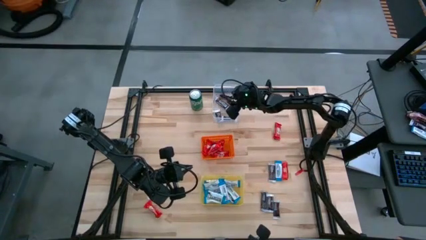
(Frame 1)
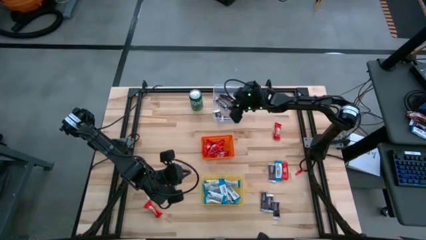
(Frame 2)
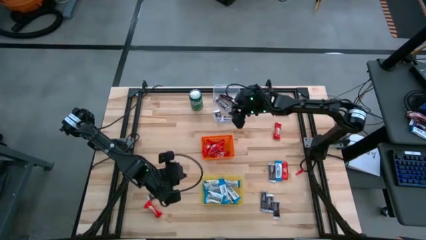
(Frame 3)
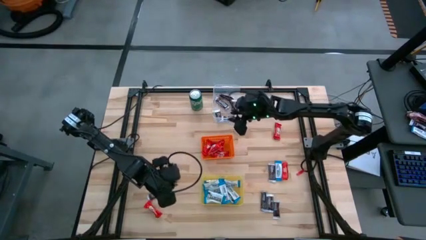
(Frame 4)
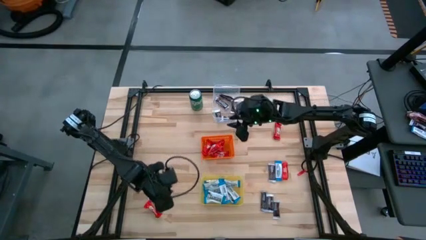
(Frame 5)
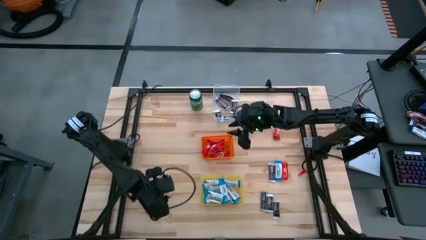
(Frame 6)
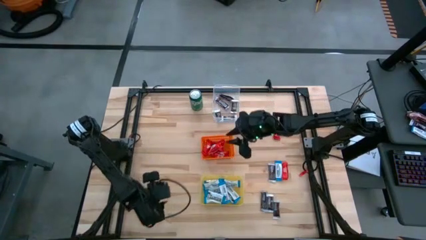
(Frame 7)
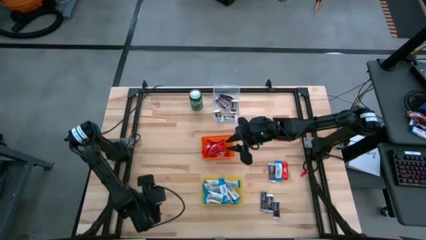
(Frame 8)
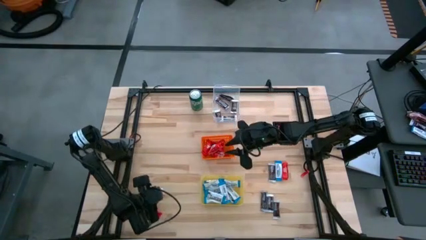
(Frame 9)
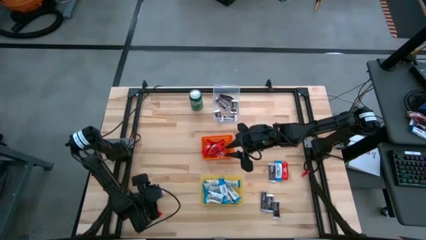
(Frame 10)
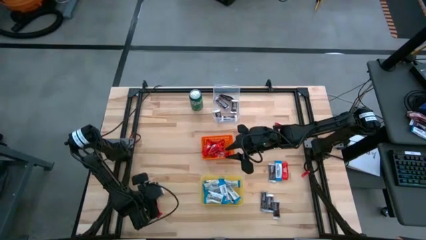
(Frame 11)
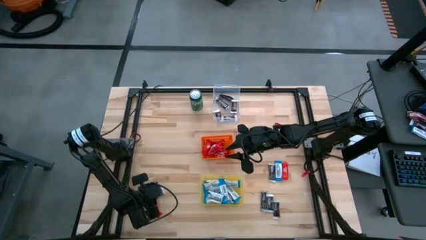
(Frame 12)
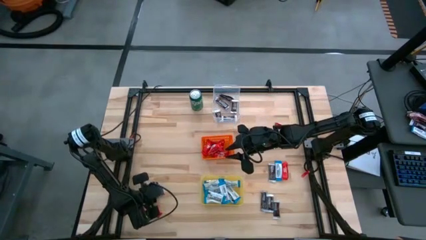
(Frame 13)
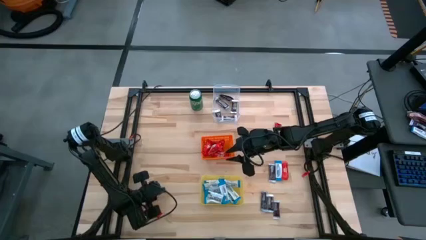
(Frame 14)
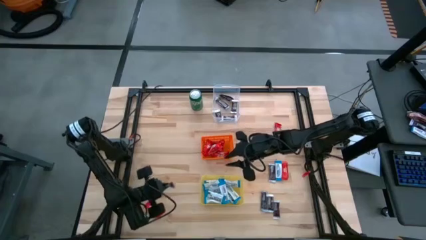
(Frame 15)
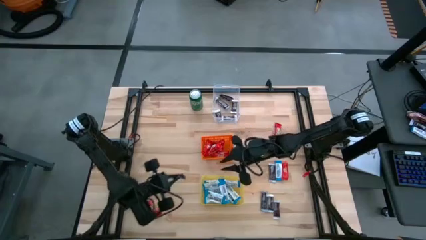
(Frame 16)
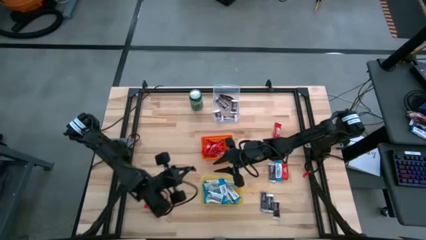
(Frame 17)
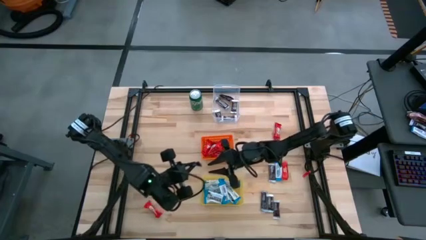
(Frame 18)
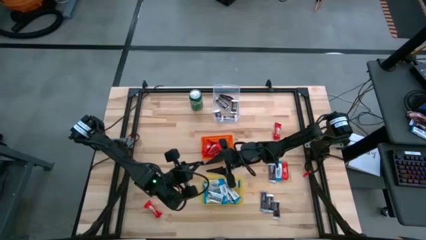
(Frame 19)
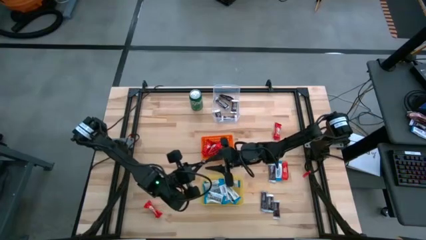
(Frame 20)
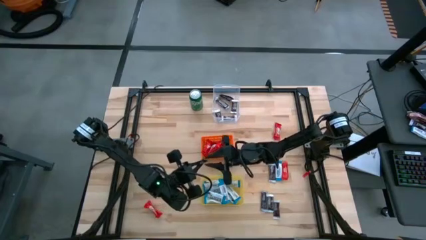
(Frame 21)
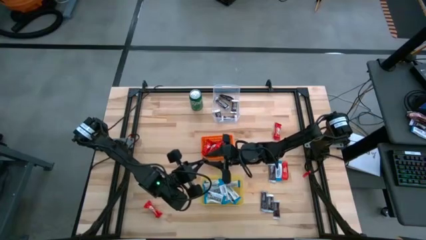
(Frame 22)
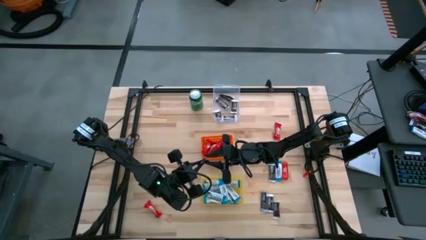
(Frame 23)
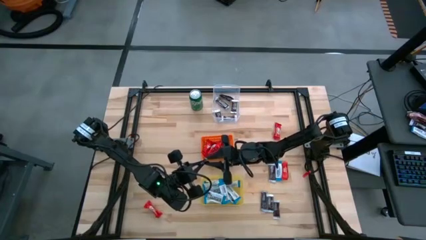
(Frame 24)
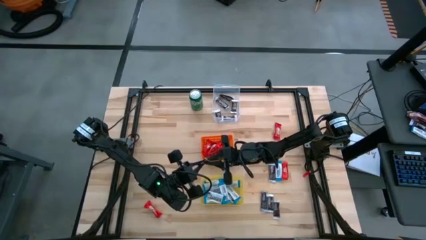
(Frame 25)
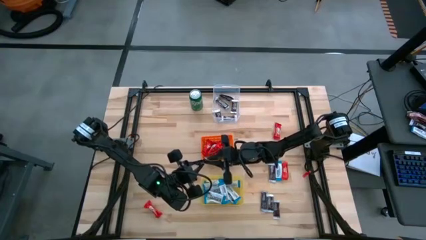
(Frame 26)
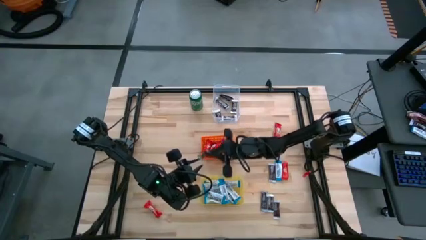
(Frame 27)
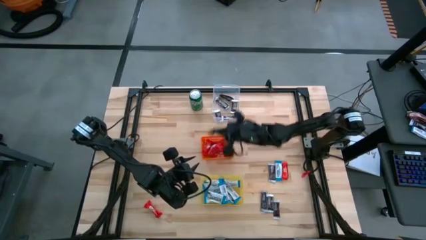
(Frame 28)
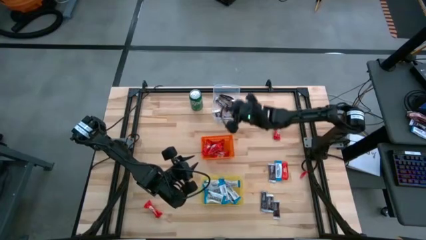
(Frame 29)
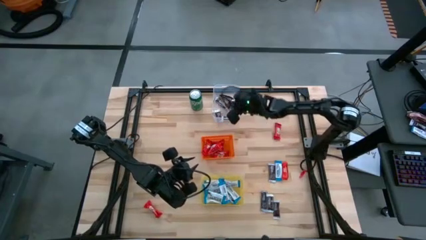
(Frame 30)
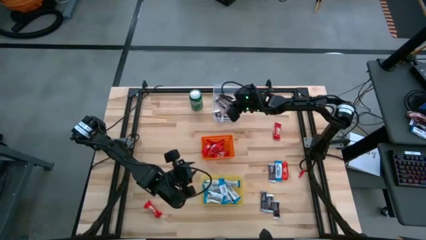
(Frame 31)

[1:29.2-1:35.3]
Task: Sort candy
Put the black candy into the transparent bin

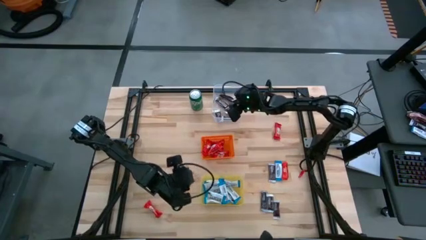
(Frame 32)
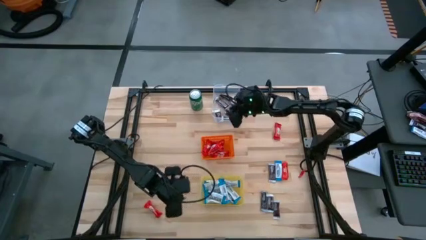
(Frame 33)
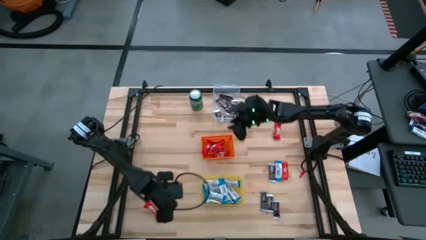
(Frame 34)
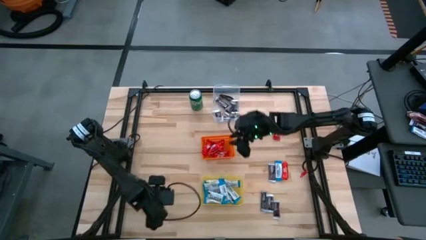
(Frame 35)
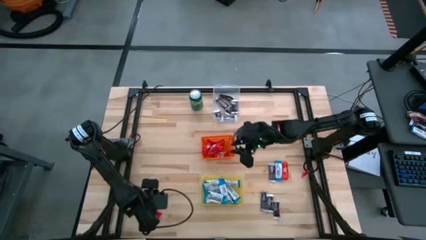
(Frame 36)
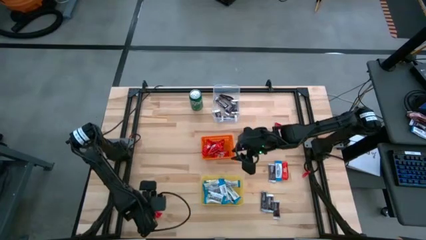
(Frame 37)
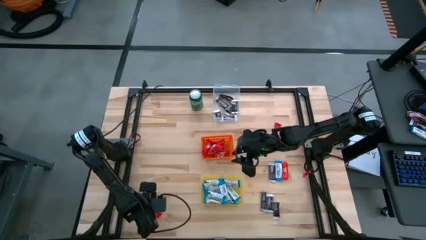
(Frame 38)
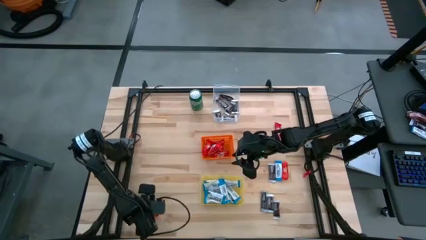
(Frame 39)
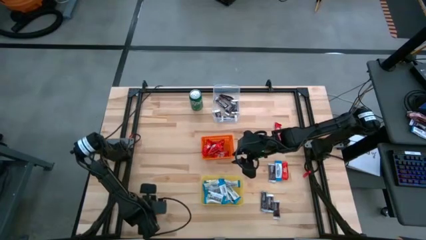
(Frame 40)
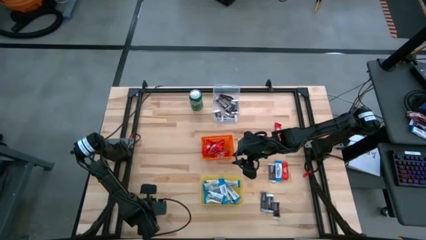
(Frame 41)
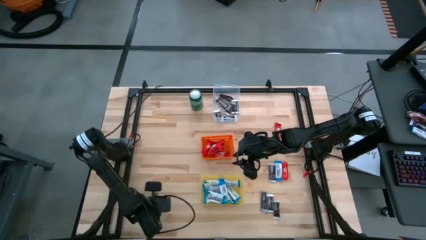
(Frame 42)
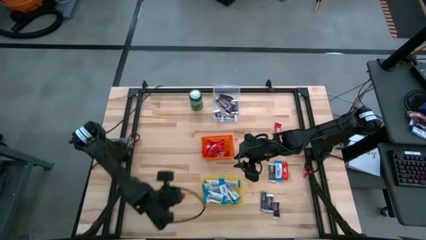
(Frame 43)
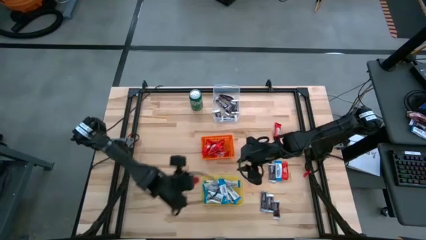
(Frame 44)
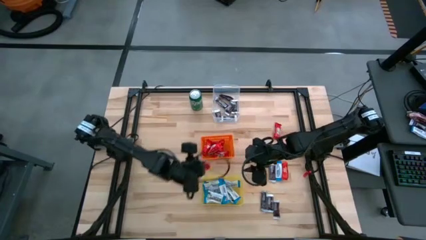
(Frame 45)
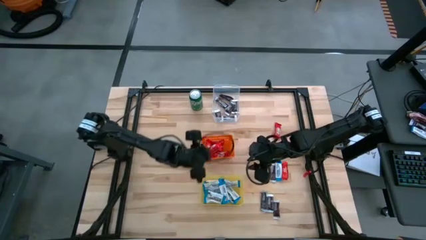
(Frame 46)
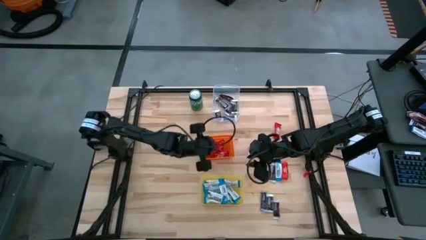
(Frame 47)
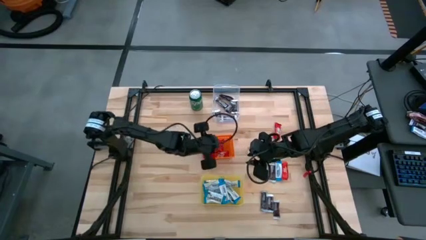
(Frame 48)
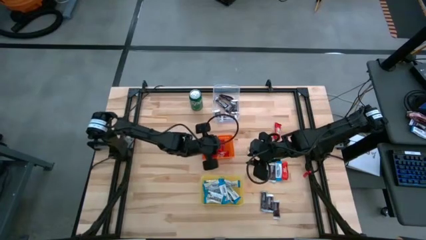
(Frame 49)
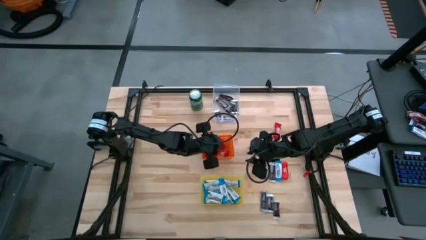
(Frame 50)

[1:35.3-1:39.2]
Put the red candy into the orange bin

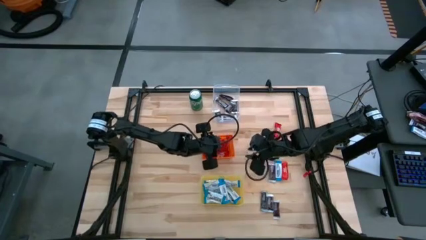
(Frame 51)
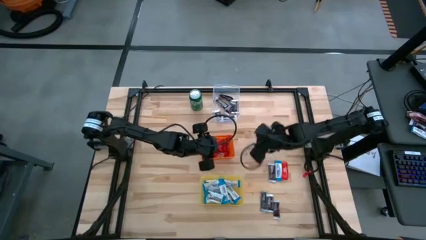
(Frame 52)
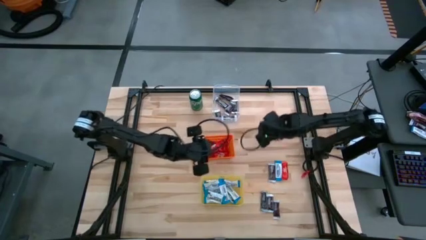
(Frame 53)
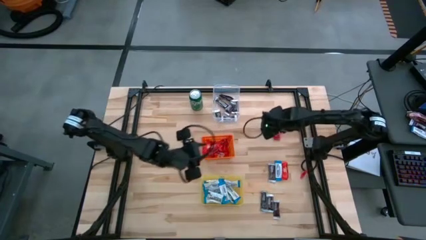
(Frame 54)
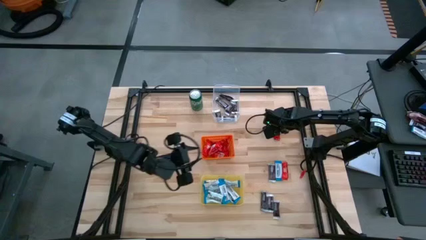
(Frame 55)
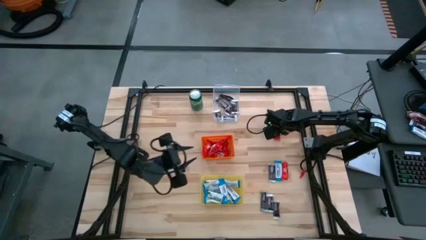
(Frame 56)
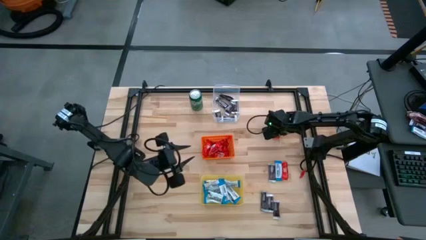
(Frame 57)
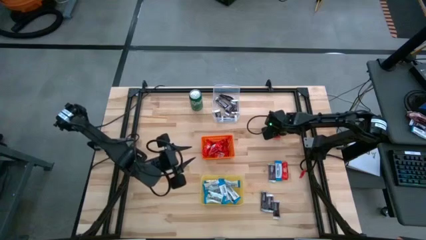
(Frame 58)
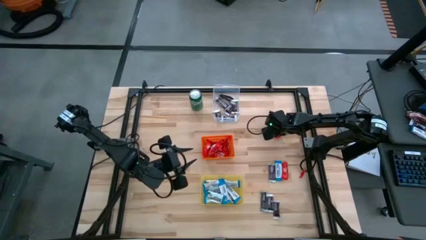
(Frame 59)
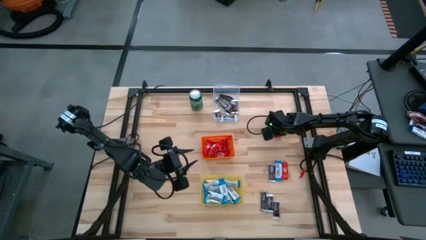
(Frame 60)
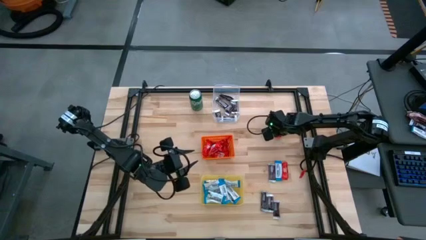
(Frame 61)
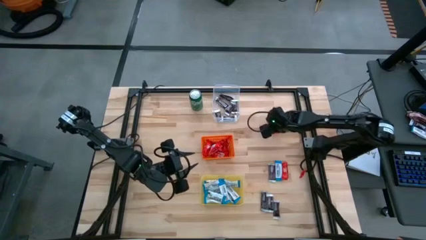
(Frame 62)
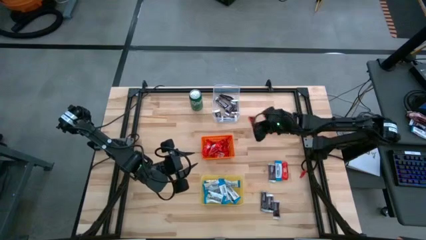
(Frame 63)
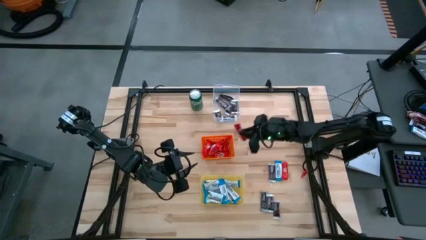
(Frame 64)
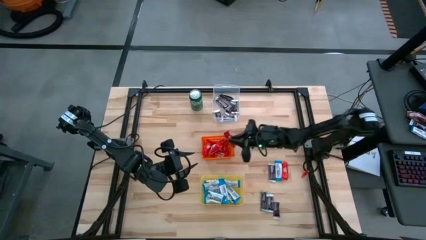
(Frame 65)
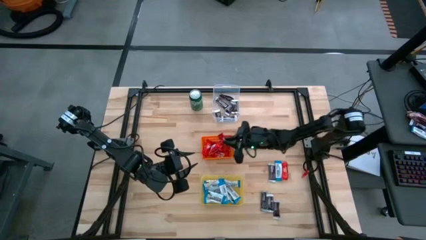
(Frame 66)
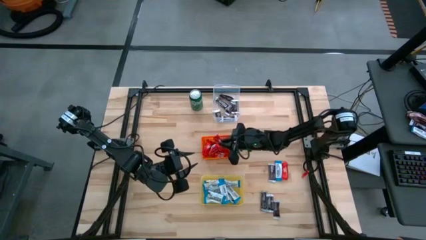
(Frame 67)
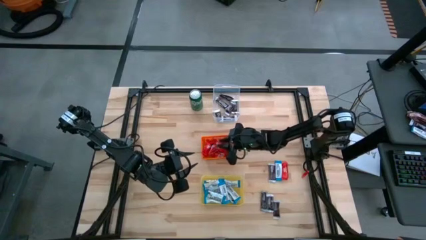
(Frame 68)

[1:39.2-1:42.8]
Put the red candy into the orange bin

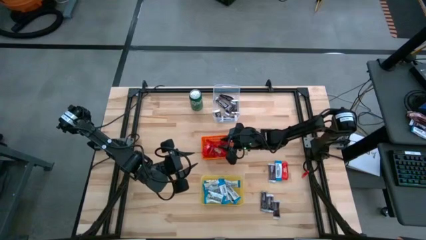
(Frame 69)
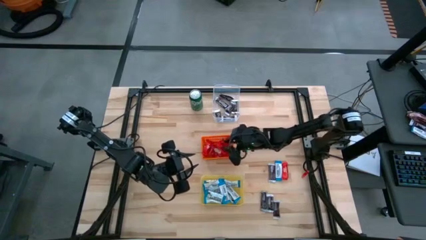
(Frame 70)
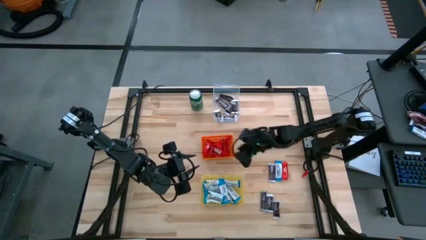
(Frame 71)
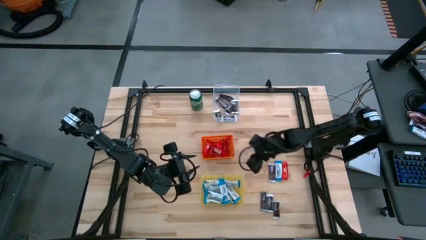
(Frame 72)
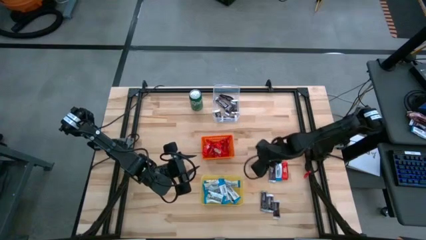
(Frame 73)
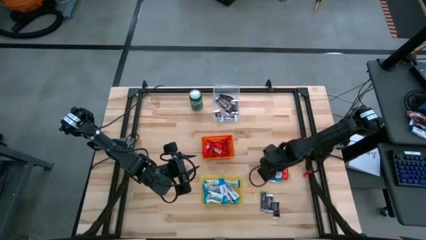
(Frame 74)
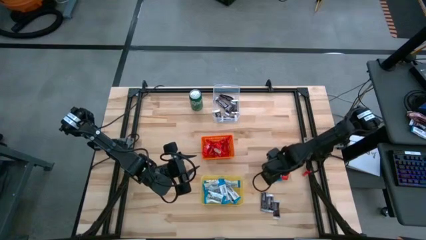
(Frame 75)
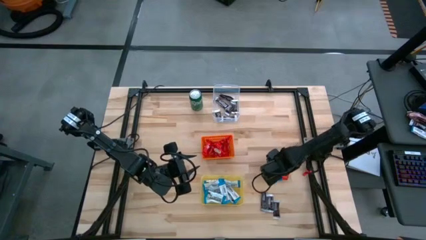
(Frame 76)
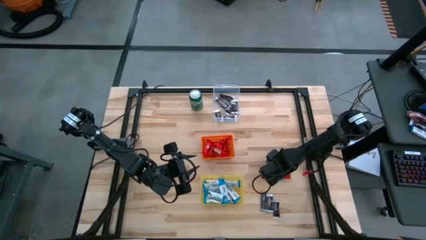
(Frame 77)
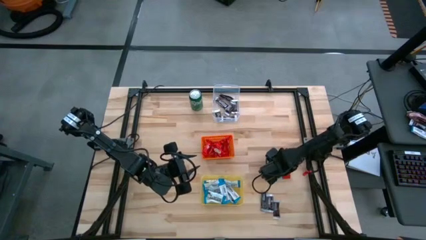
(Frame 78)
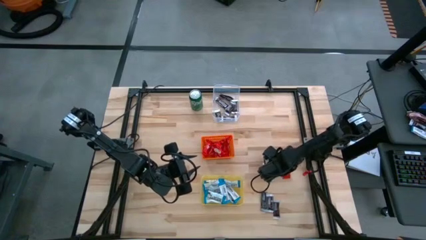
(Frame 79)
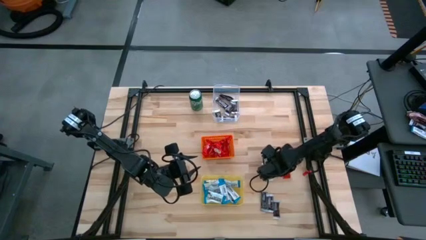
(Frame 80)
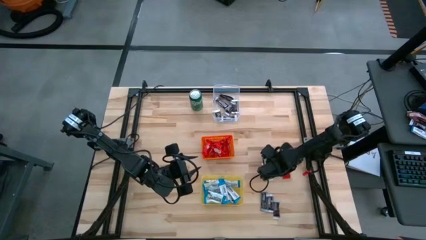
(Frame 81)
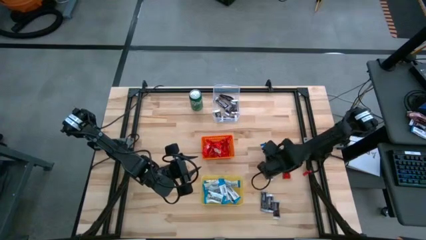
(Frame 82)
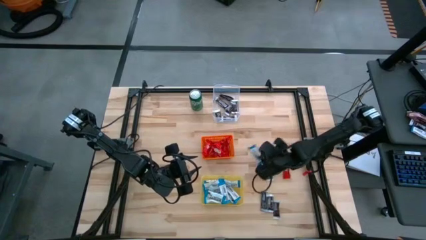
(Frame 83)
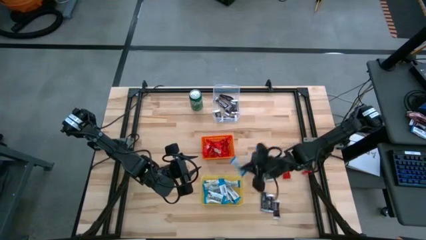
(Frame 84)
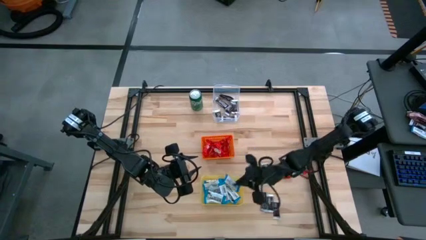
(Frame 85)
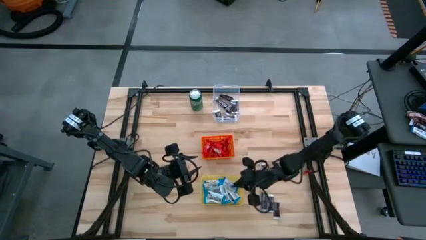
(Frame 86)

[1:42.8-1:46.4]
Put the white candy into the yellow bin
